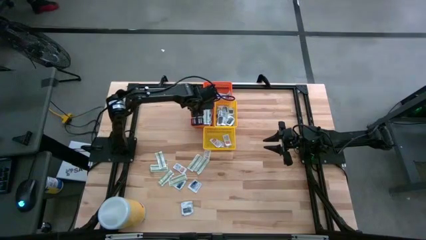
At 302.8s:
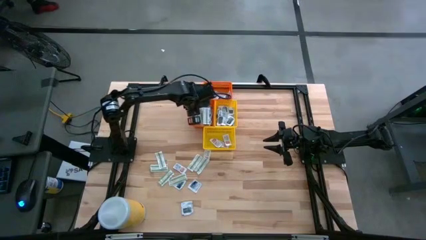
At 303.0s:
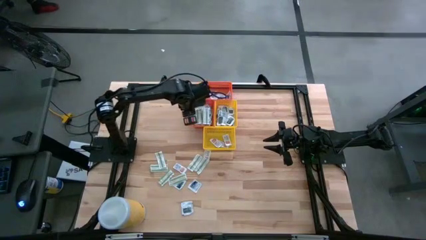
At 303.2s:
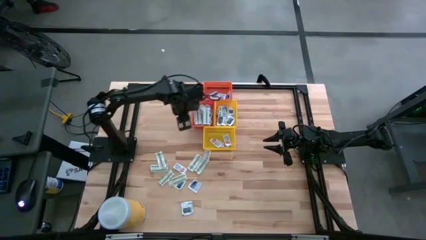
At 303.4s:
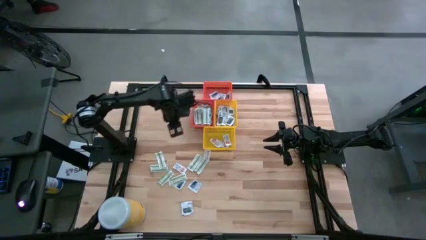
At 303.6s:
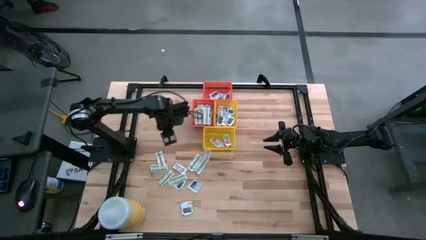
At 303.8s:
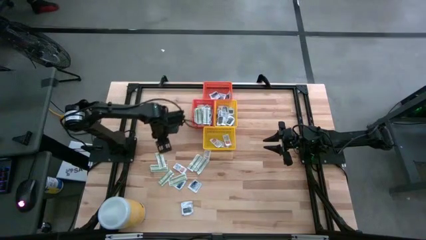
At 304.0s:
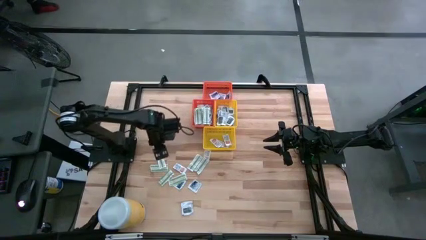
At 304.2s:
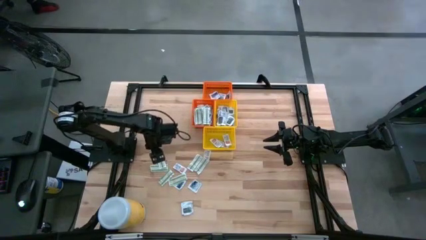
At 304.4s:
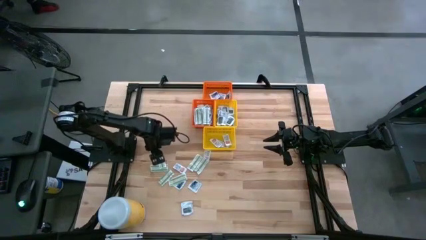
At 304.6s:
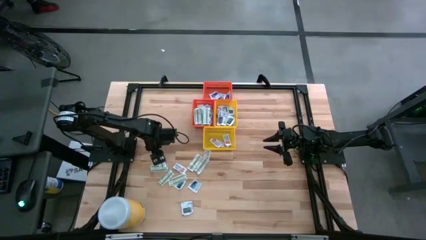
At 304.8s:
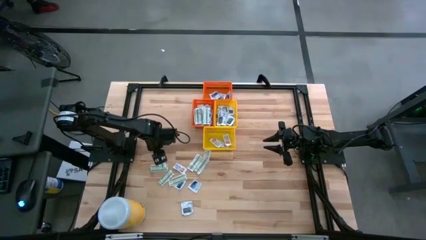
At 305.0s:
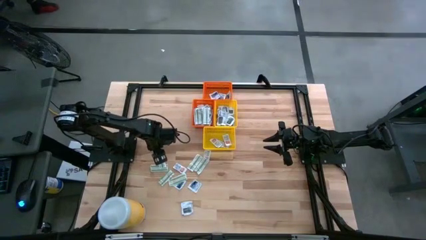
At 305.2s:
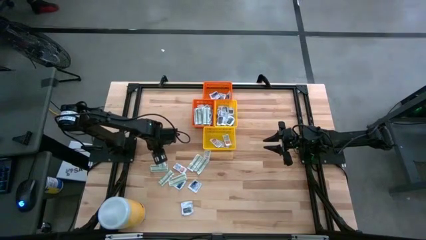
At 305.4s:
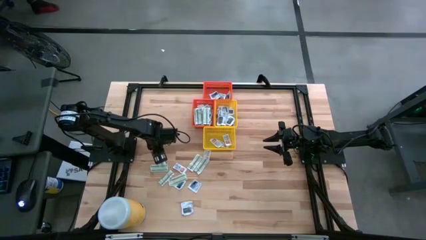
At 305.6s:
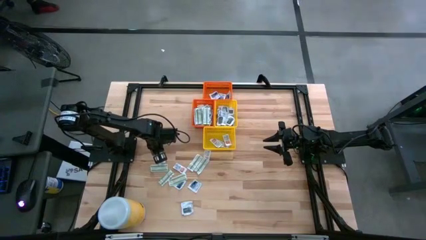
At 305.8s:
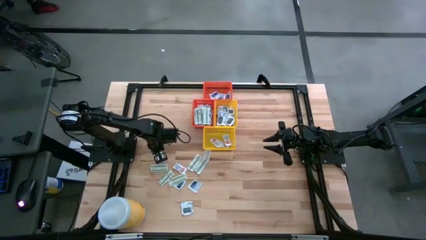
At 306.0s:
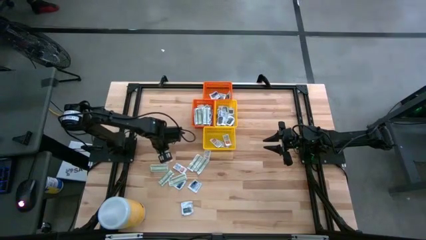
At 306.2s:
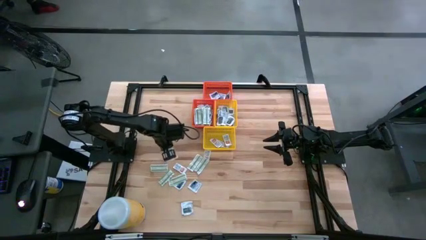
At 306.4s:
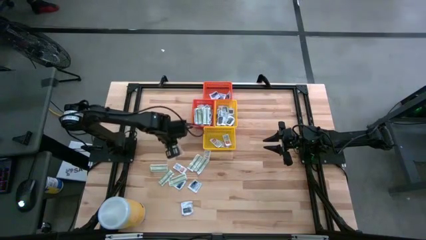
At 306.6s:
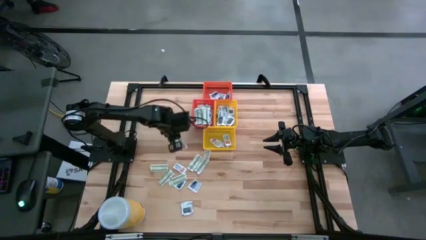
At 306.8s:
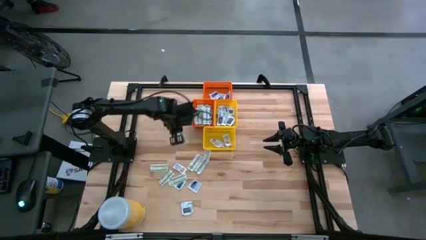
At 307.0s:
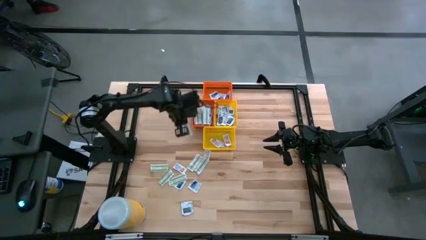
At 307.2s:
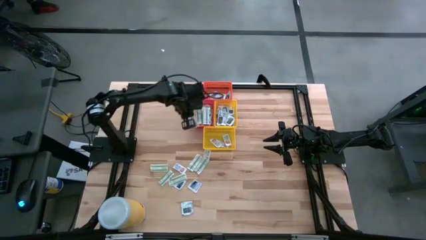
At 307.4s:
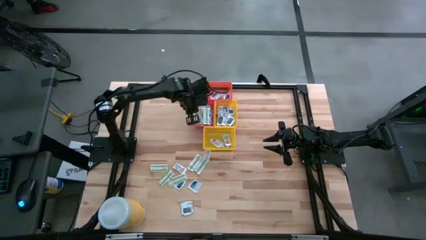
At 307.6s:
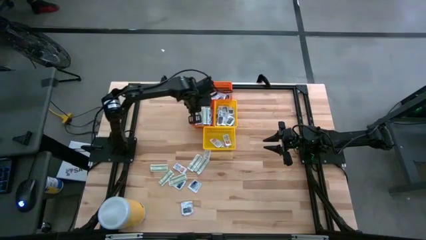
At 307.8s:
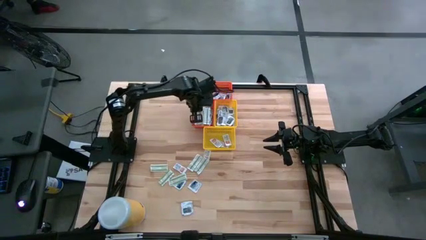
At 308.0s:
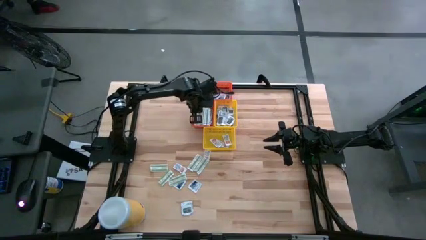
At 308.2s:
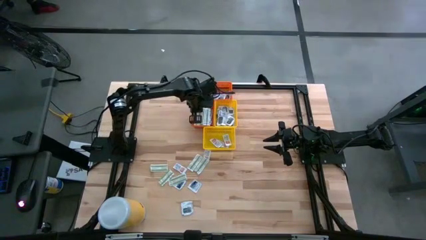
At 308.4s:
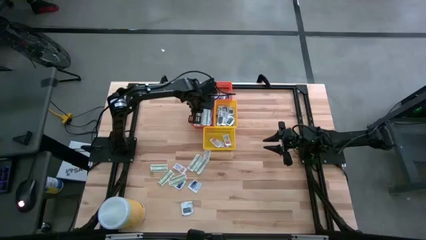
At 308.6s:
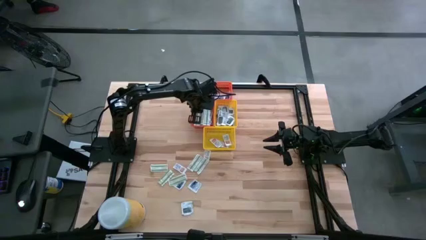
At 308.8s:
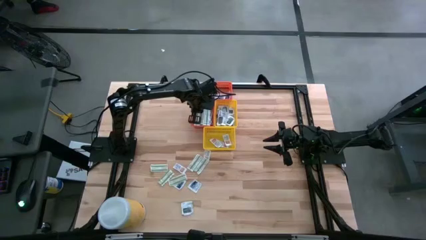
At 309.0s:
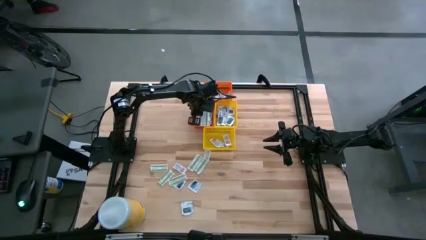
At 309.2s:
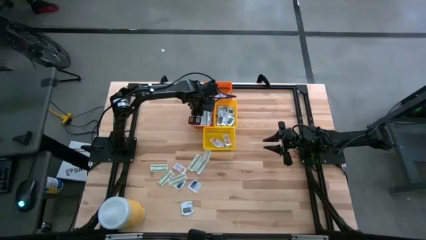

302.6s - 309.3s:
Task: Pick & Place First Aid Supplies
Put the bandage into the bottom orange bin

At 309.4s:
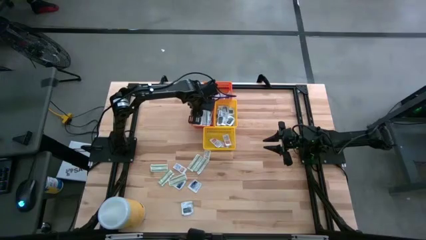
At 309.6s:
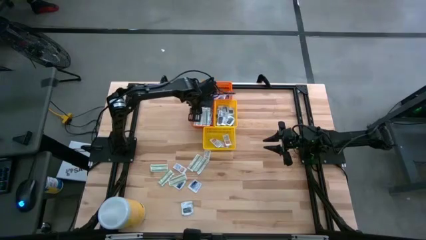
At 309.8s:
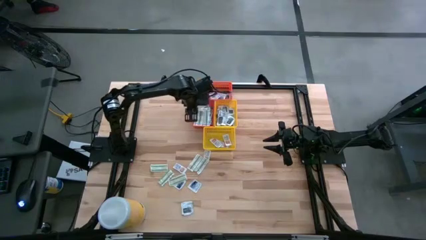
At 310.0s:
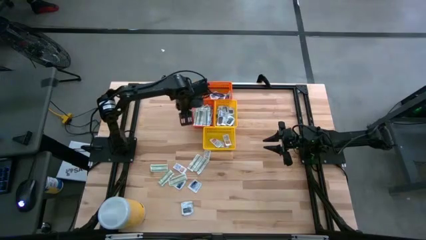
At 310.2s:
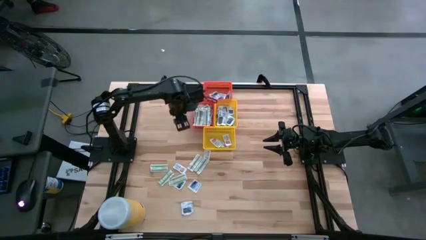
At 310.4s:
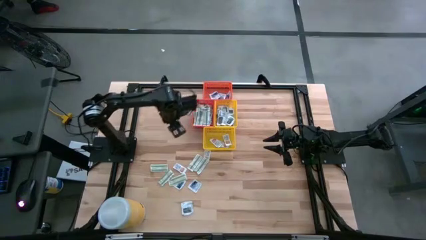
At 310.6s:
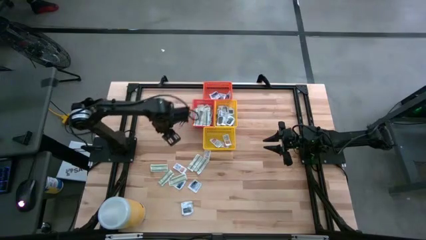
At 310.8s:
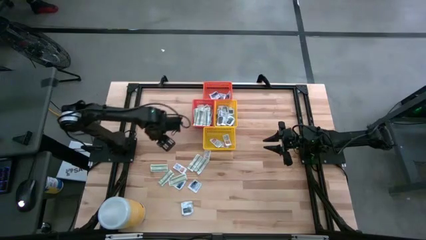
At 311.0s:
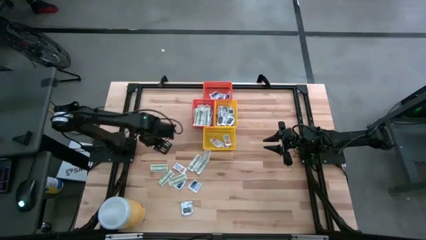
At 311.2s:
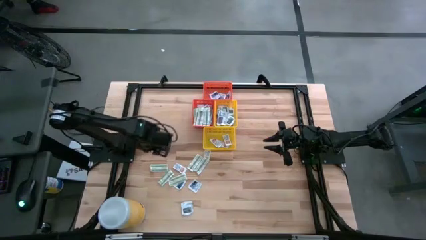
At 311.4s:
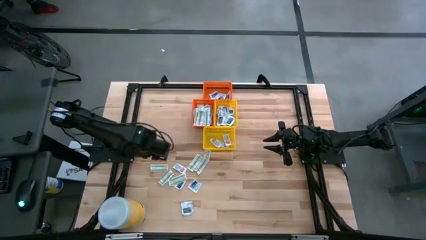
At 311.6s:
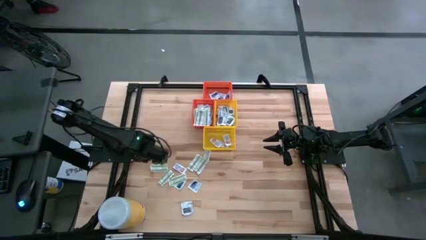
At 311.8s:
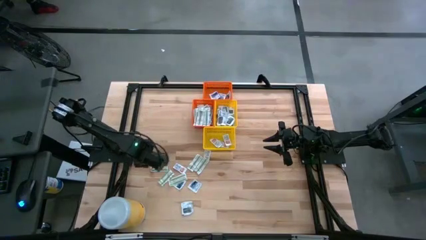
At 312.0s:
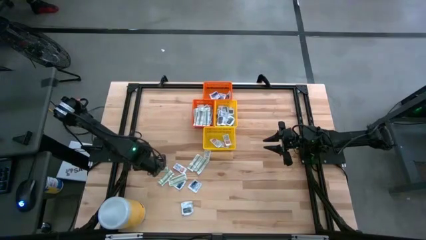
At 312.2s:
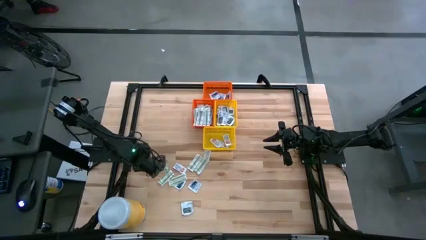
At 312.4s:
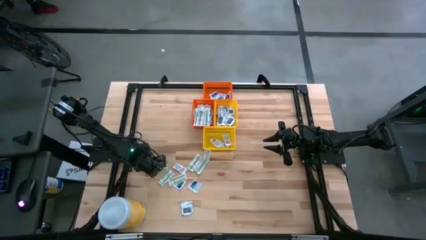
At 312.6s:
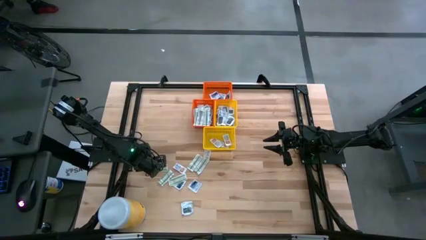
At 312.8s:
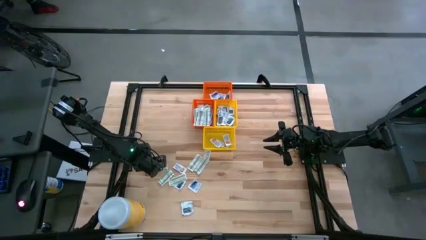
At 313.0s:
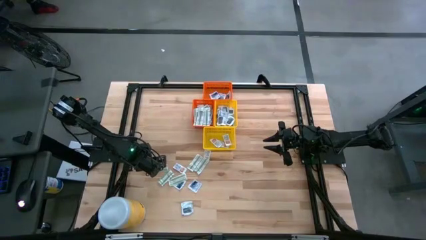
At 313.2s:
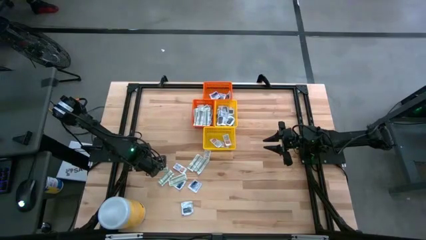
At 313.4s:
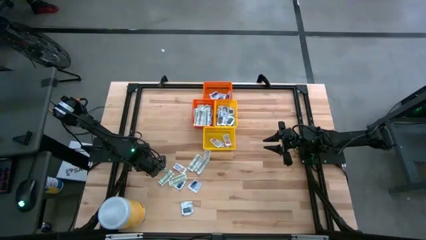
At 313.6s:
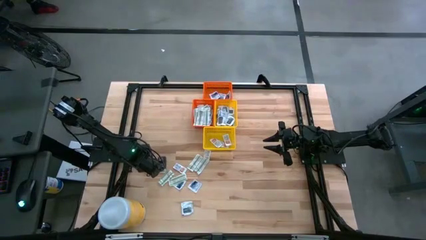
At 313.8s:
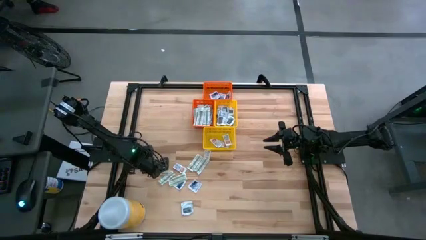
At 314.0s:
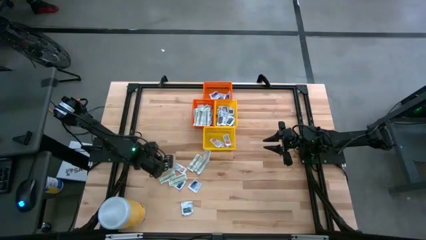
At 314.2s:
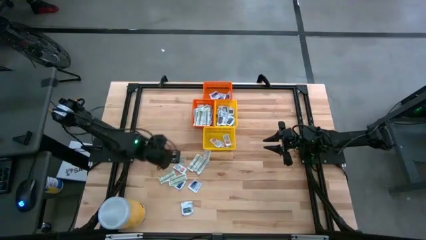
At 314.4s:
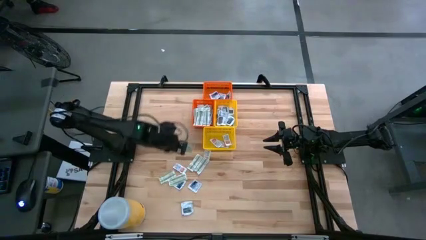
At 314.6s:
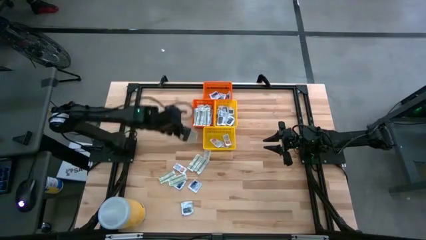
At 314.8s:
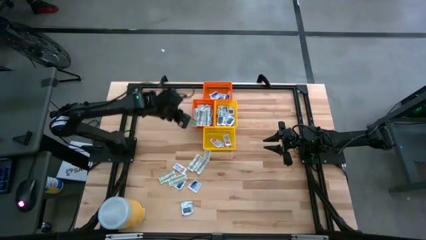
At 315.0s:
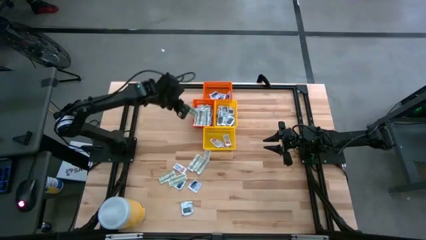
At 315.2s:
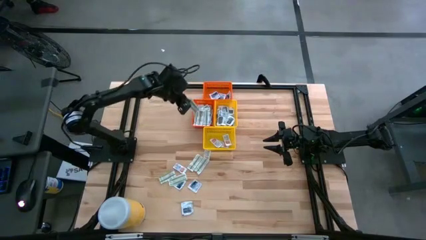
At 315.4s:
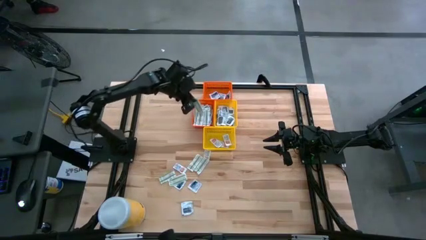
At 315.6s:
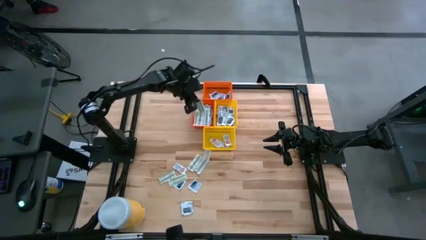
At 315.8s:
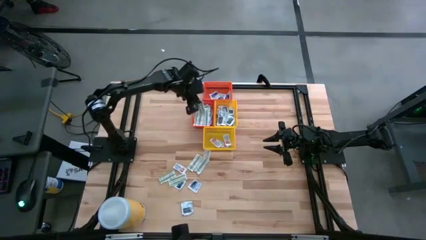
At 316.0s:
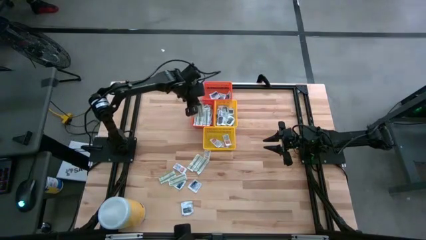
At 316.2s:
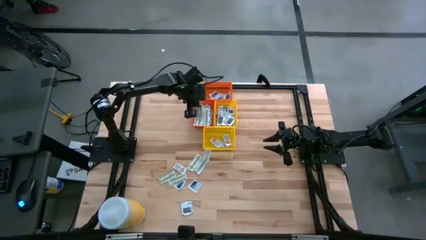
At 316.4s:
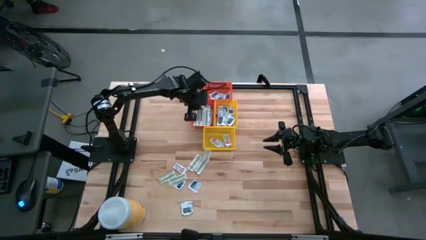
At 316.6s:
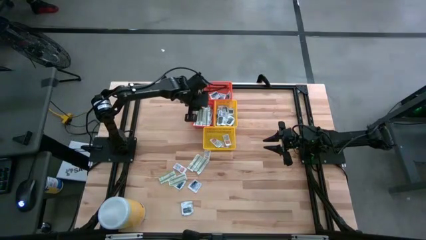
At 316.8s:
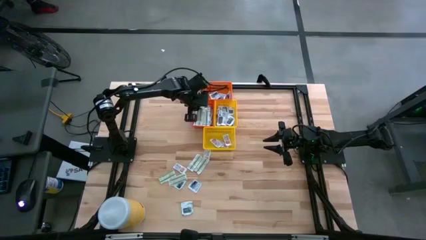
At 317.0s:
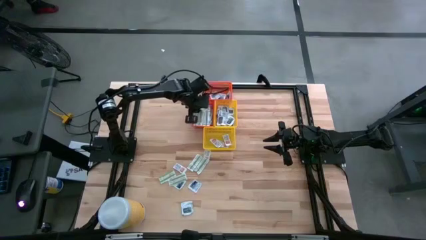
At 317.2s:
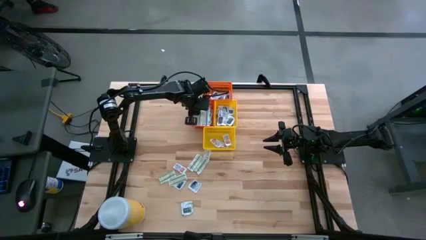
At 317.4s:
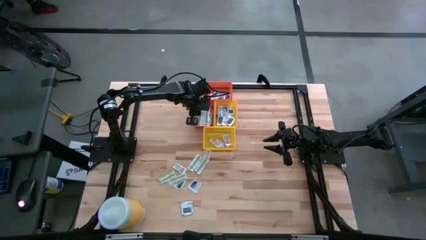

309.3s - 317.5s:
Put the bandage into the bottom orange bin
